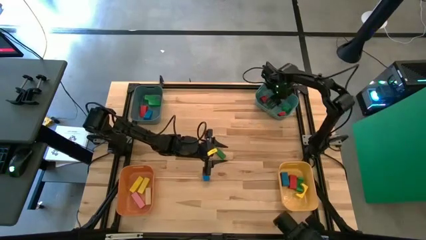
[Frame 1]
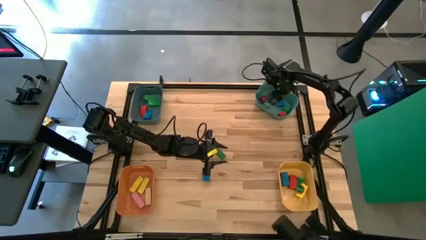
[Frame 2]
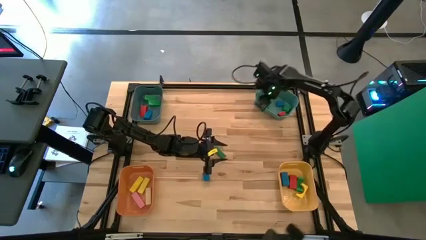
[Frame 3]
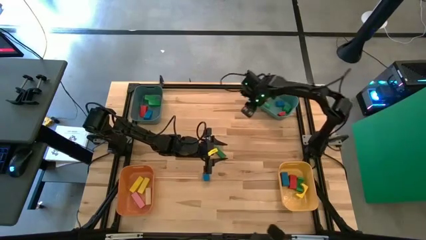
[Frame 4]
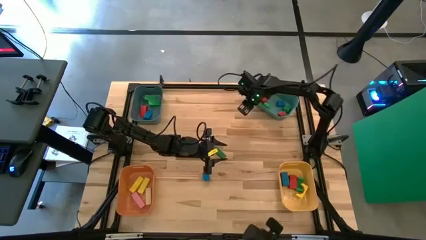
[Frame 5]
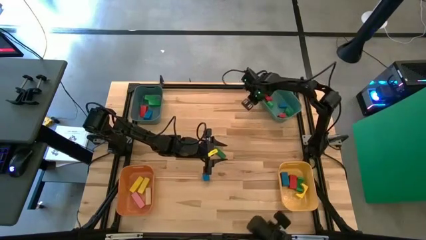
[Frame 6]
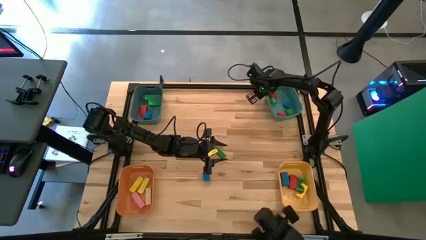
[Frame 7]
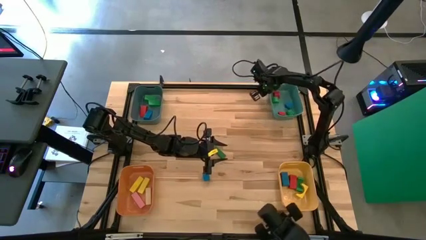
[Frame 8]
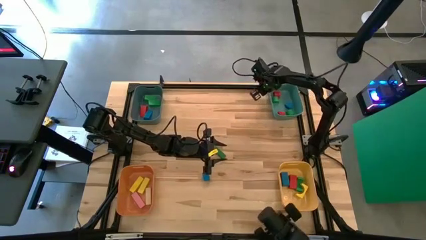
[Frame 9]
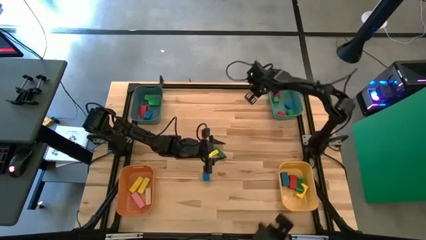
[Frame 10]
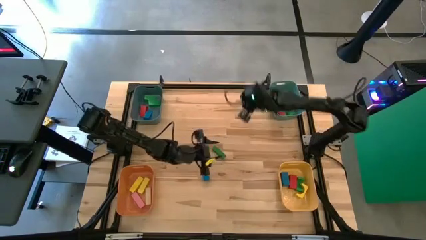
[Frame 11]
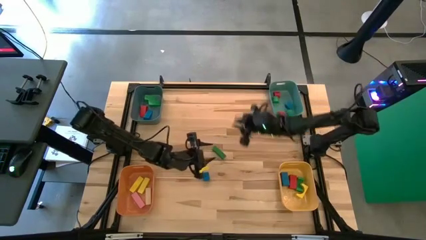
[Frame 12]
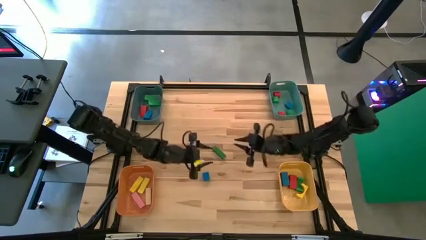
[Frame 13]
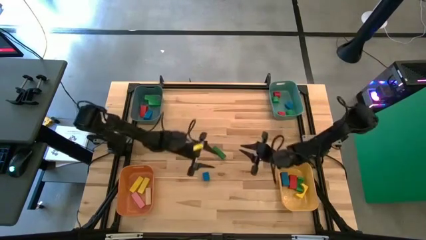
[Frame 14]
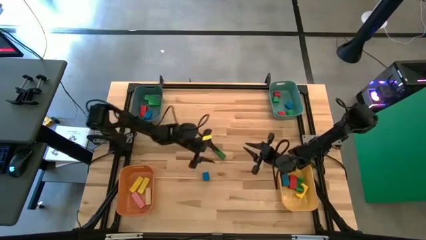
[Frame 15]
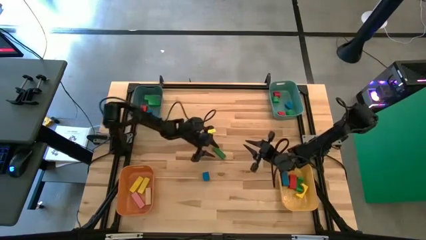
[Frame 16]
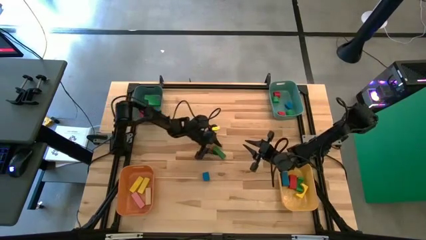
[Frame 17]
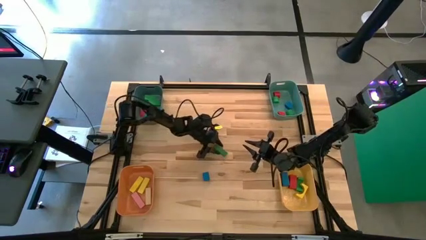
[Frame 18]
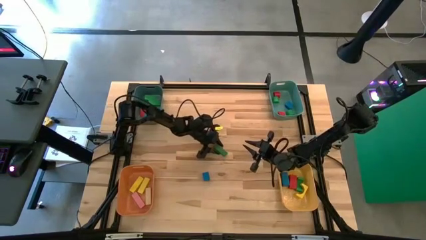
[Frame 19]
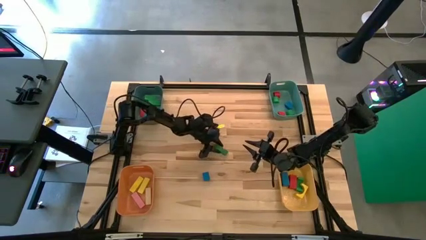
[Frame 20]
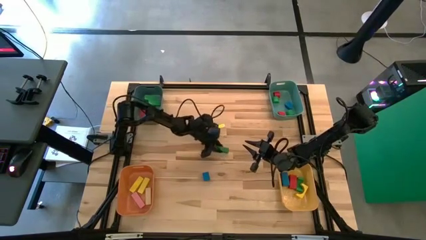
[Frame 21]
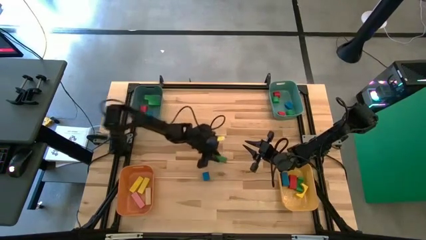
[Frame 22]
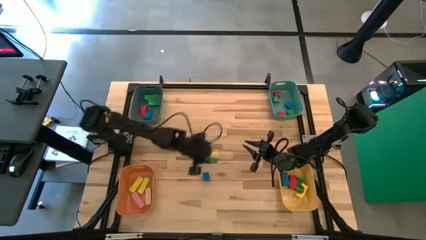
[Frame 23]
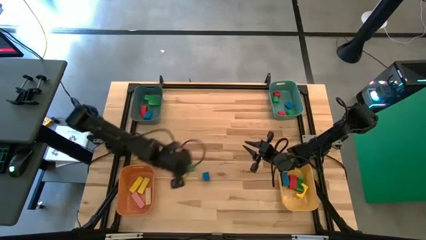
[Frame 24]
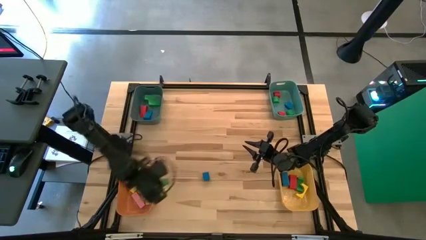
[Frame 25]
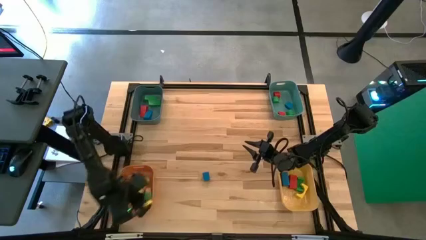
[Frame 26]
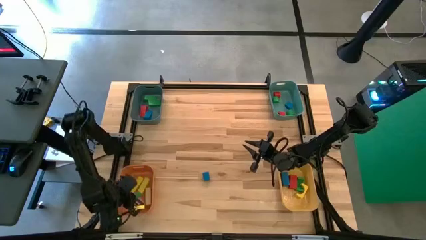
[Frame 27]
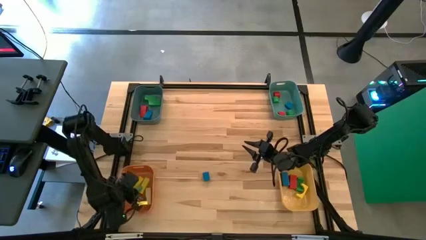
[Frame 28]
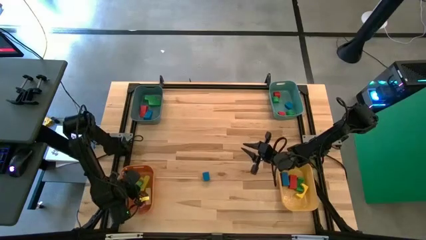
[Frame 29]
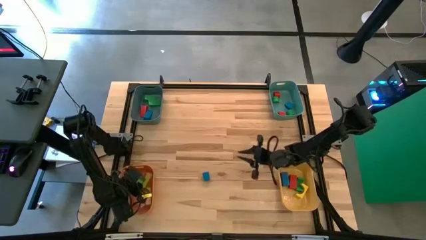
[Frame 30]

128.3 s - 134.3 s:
Task: Sort blocks by size
Put the green rectangular block into the orange bin

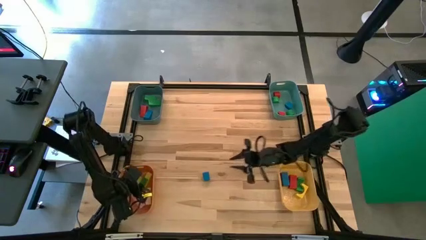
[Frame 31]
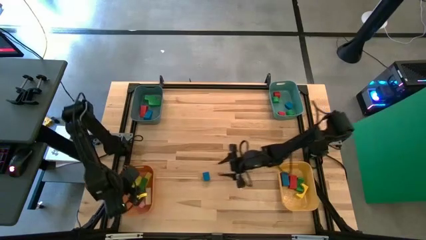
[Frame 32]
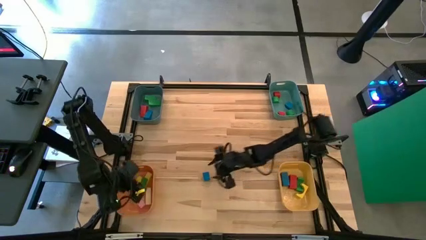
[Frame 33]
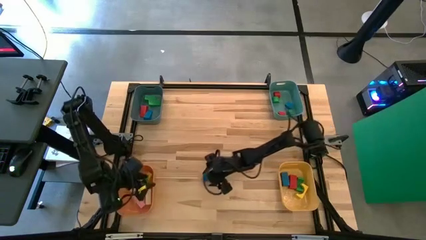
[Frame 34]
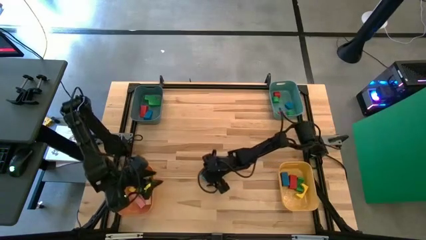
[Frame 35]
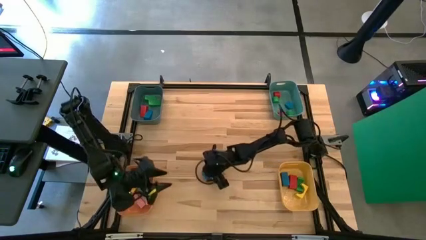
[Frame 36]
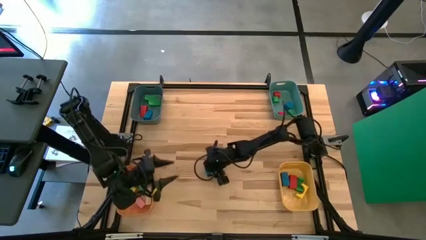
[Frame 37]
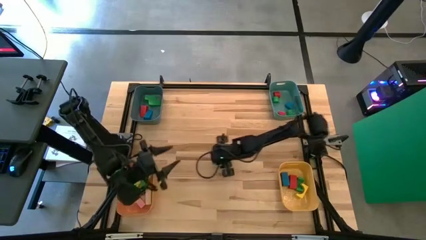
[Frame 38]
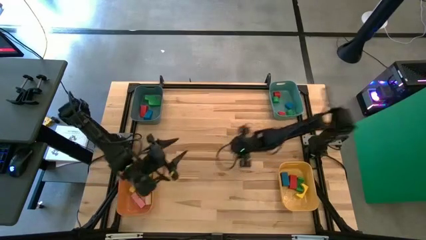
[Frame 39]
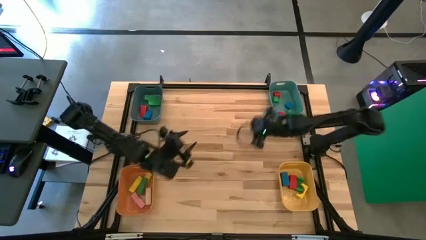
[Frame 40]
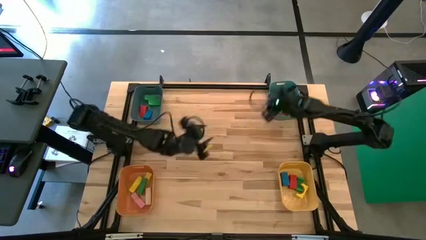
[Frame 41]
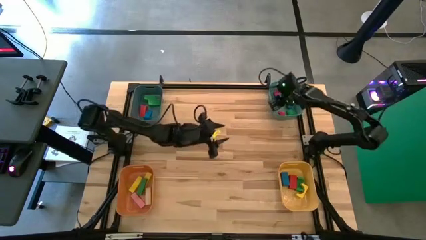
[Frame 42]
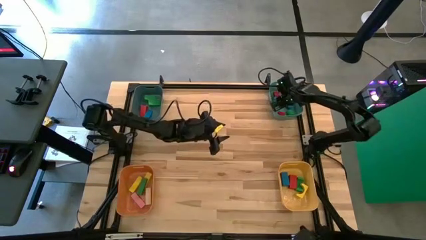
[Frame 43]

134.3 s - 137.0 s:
Put the blue semicircle block into the green bin

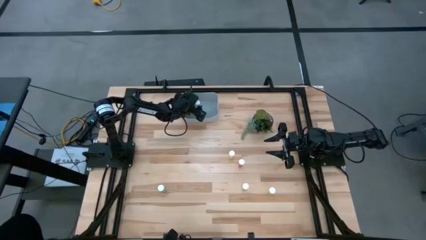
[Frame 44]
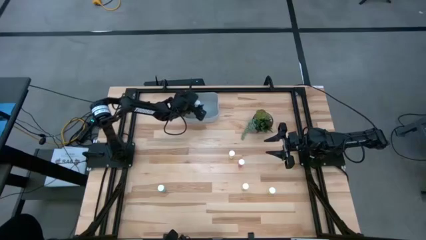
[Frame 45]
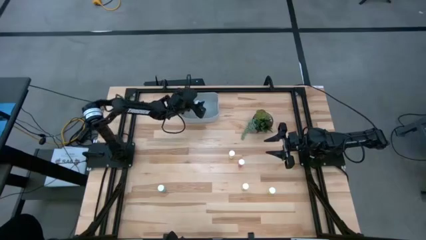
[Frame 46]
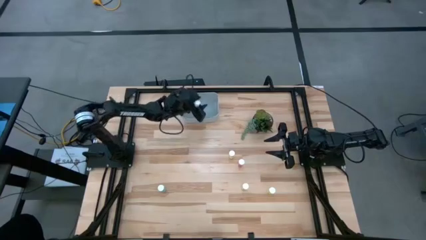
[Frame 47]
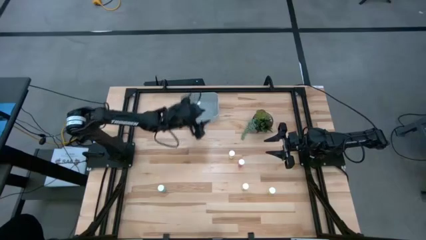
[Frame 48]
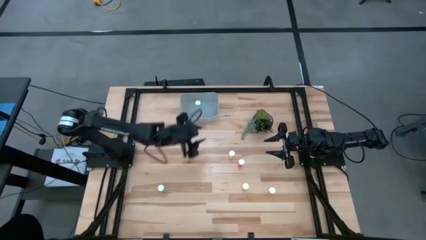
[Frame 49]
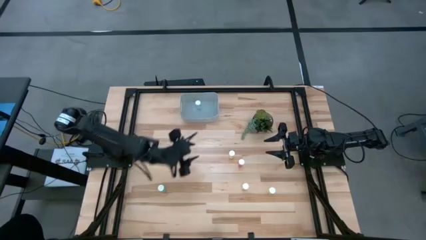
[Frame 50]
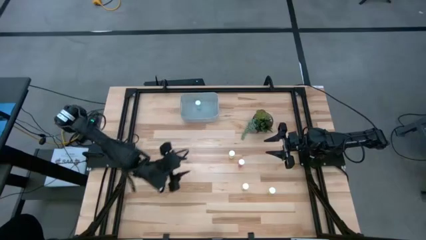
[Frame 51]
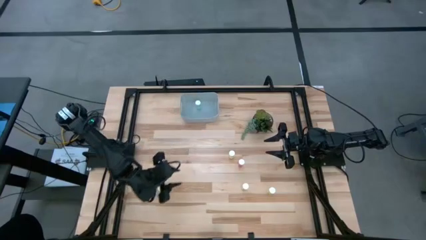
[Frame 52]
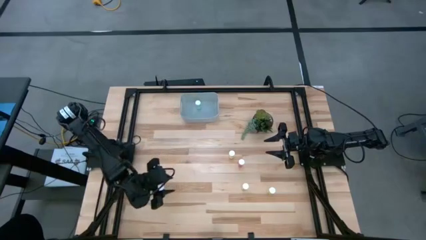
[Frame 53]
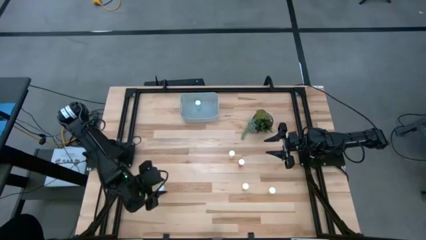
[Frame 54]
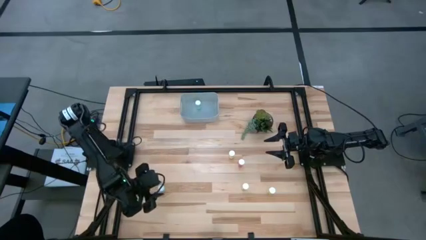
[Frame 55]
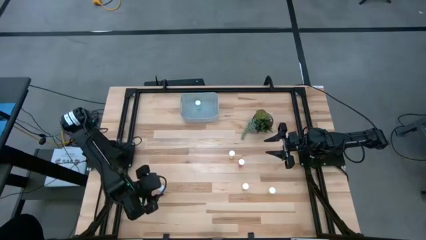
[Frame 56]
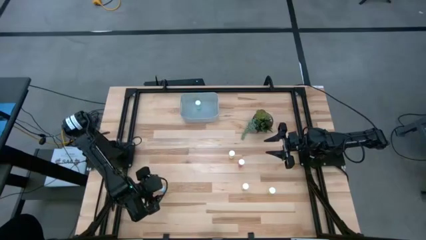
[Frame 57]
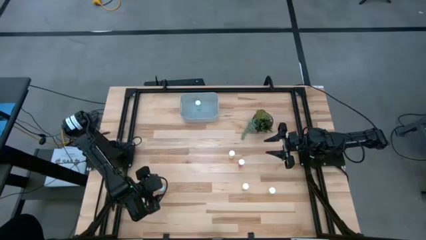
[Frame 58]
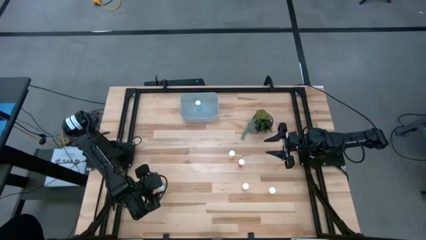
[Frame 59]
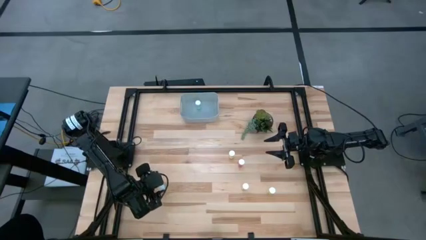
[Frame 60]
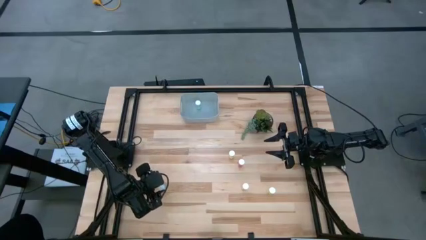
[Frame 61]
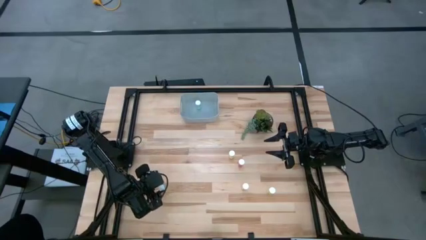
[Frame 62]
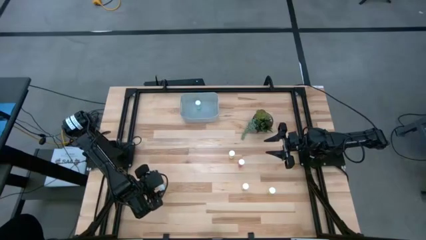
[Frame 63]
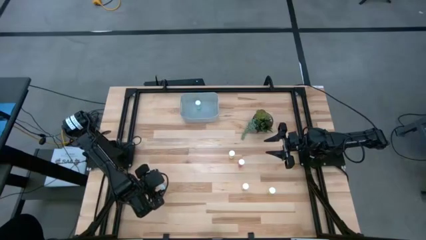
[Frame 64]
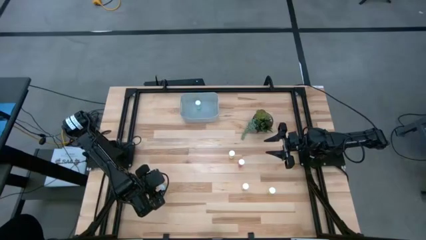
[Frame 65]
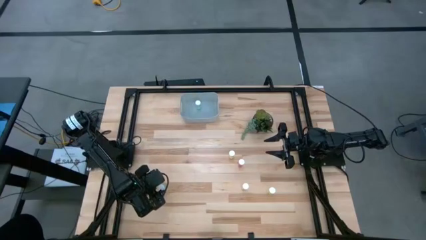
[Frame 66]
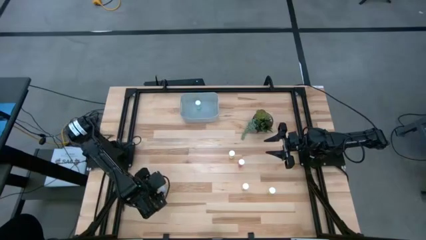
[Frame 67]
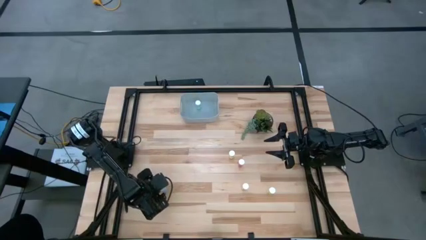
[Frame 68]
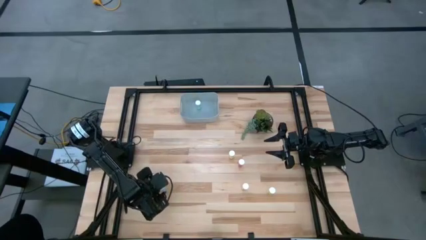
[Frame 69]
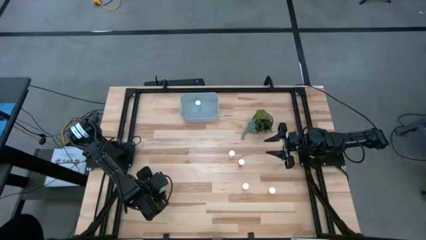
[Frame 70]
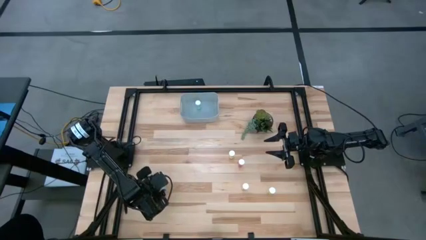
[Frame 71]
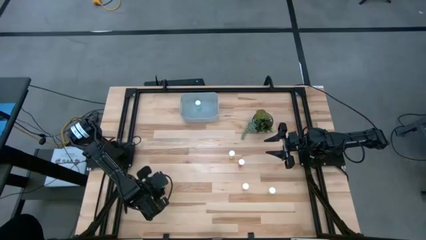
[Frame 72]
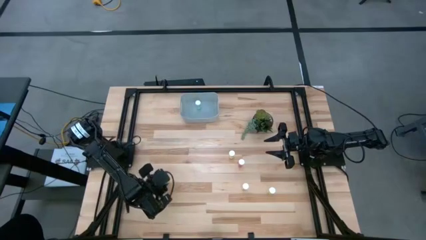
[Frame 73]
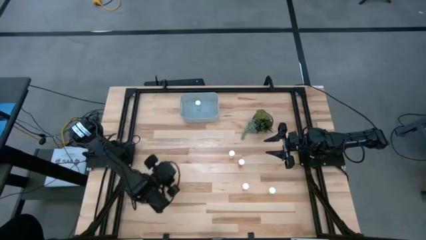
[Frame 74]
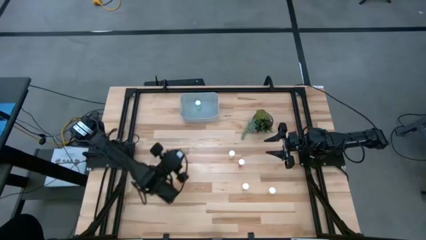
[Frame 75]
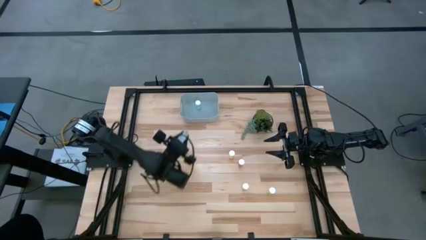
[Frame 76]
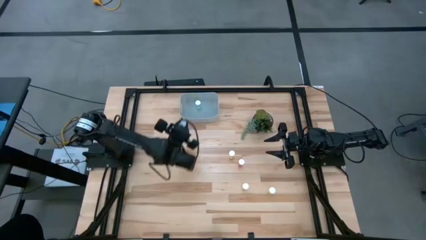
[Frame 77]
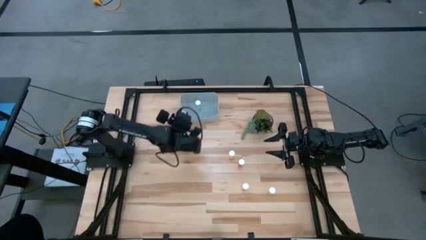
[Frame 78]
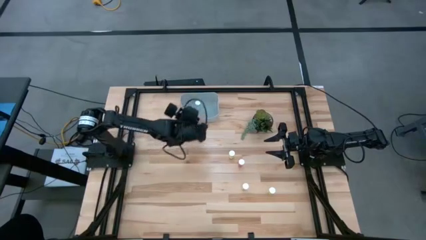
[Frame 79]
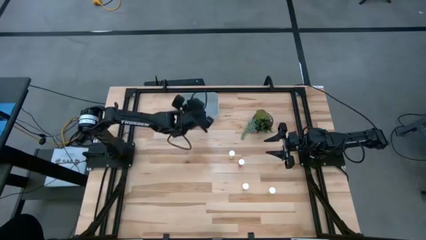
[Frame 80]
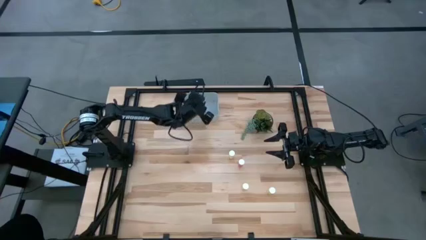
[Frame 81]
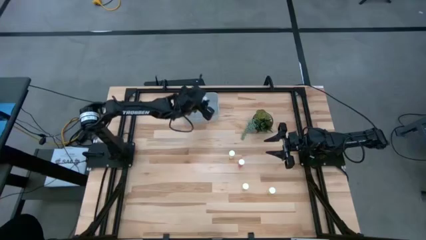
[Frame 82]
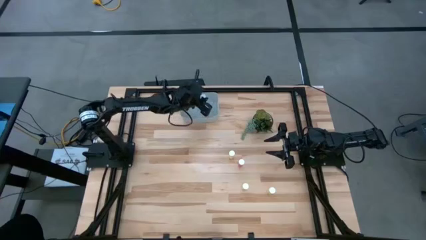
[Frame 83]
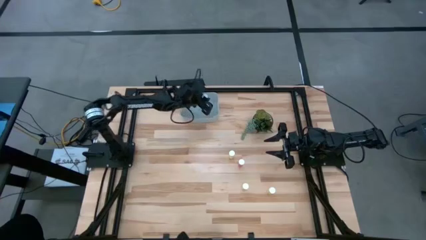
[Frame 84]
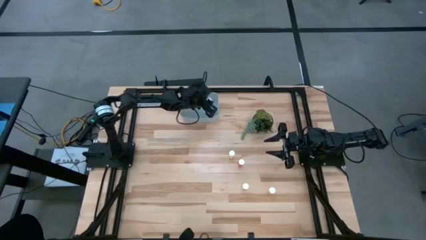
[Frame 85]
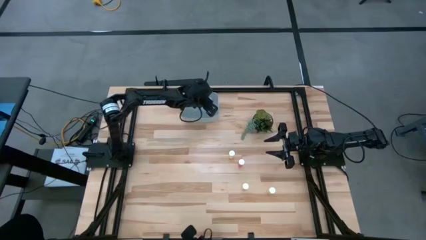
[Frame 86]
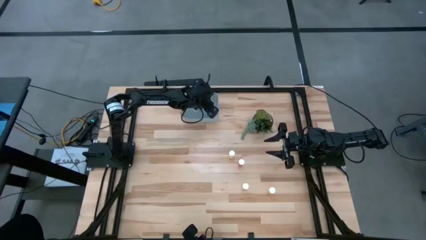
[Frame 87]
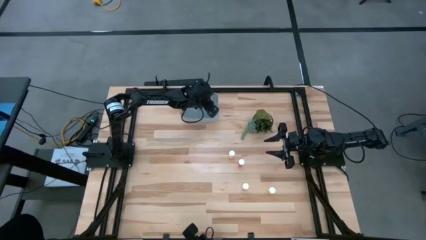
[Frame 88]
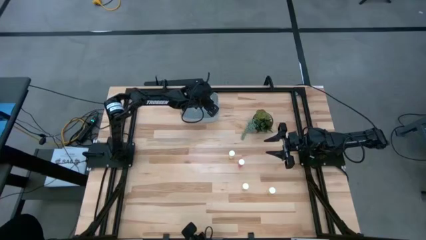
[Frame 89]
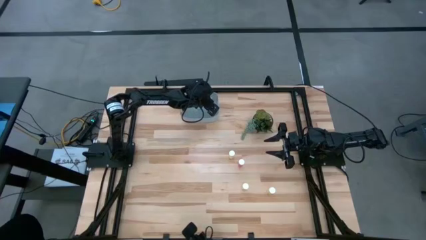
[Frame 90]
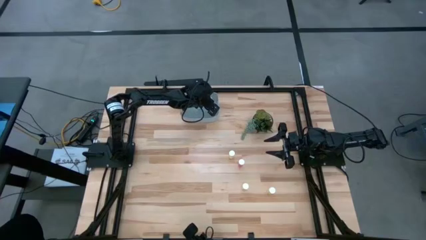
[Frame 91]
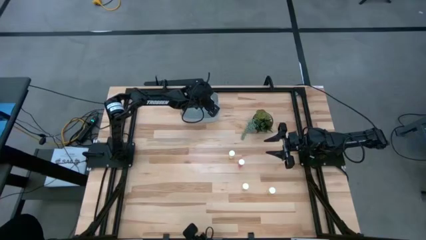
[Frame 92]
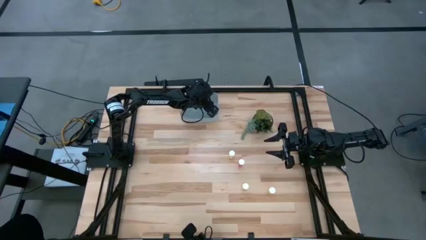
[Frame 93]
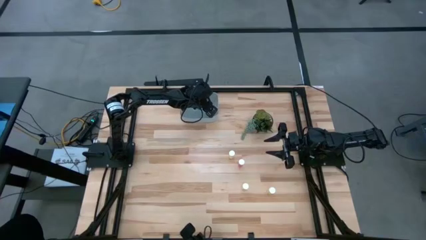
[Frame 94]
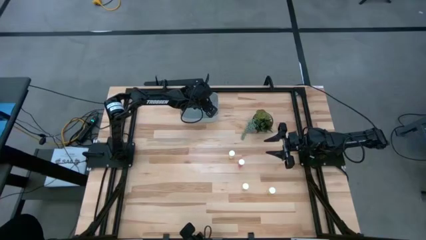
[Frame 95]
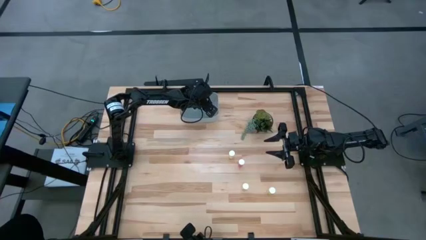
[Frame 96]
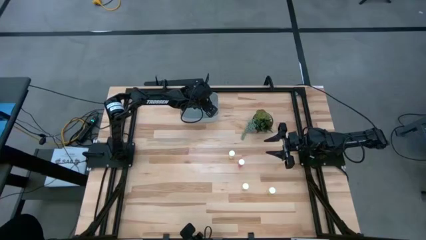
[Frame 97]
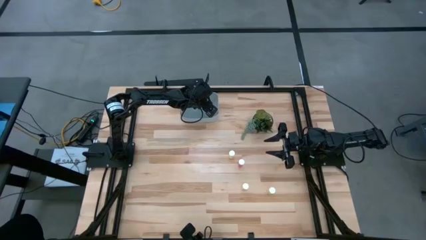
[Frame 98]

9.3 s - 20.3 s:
Task: Pick and place pill bottles into a basket
Put the green pill bottle into the gray container
